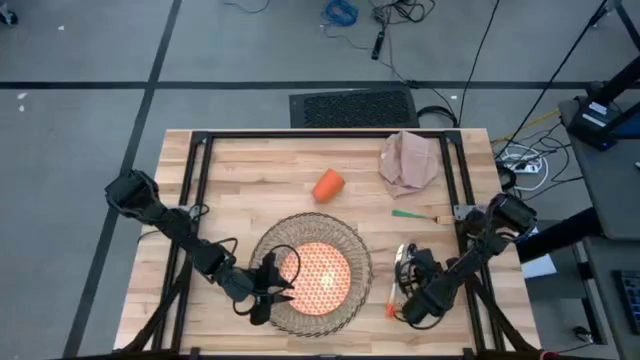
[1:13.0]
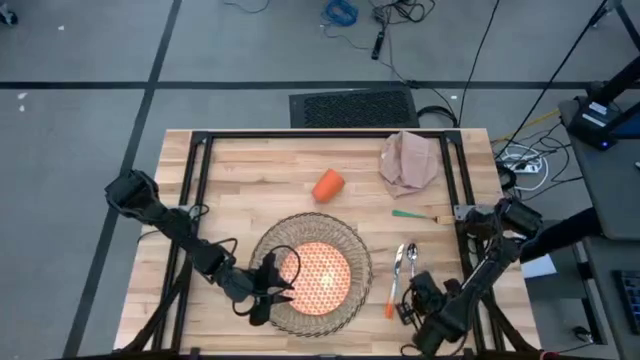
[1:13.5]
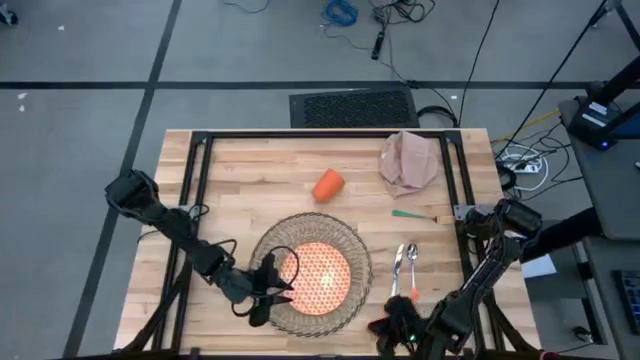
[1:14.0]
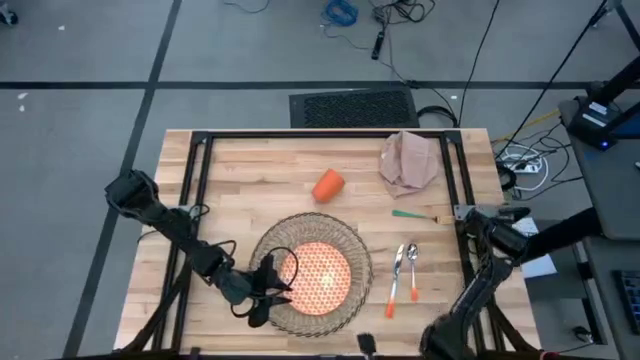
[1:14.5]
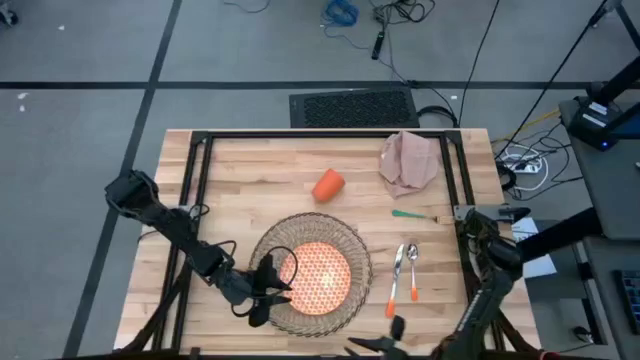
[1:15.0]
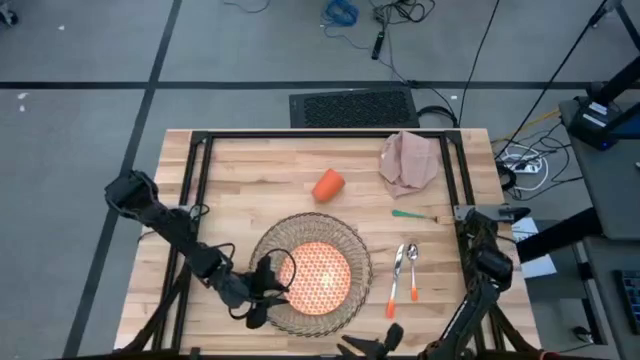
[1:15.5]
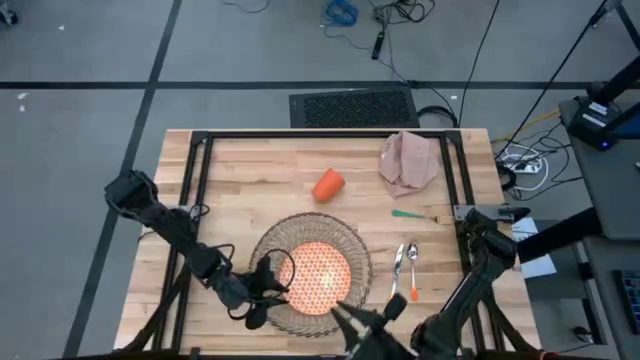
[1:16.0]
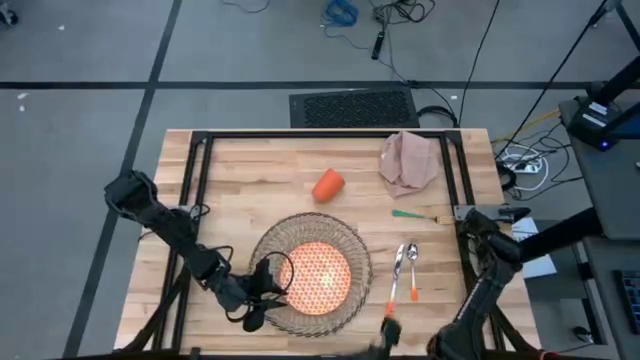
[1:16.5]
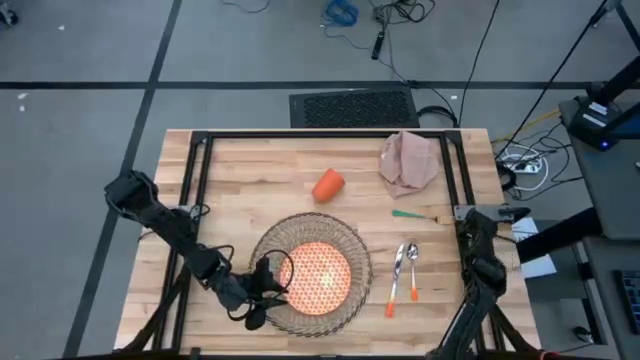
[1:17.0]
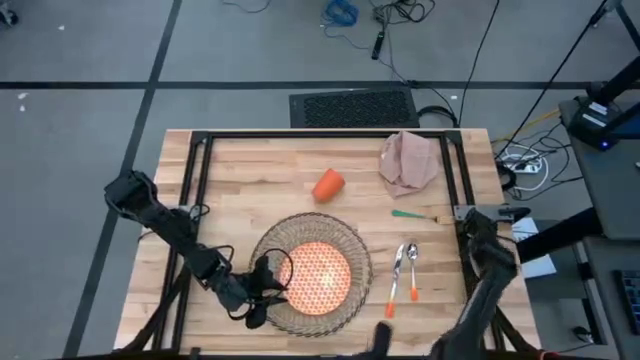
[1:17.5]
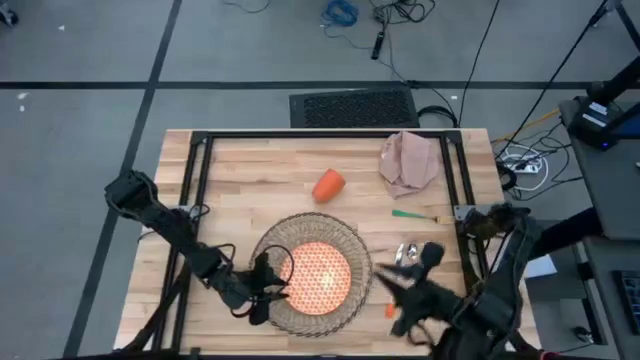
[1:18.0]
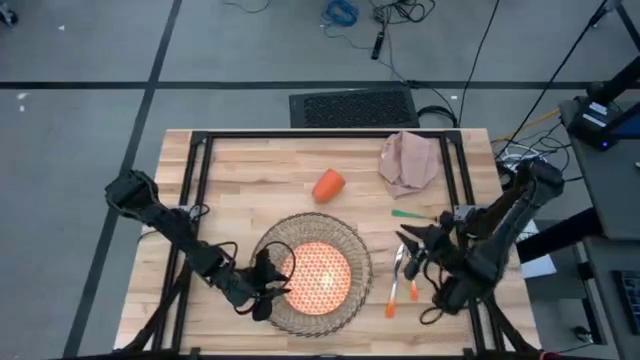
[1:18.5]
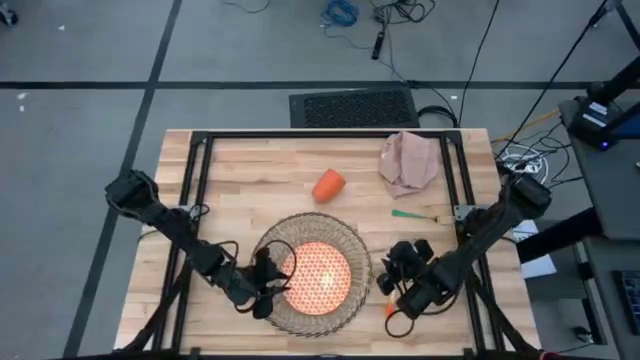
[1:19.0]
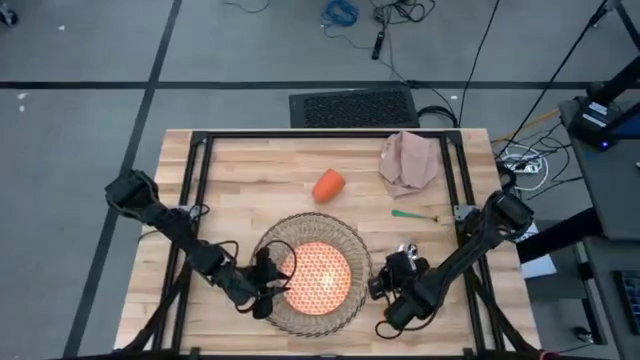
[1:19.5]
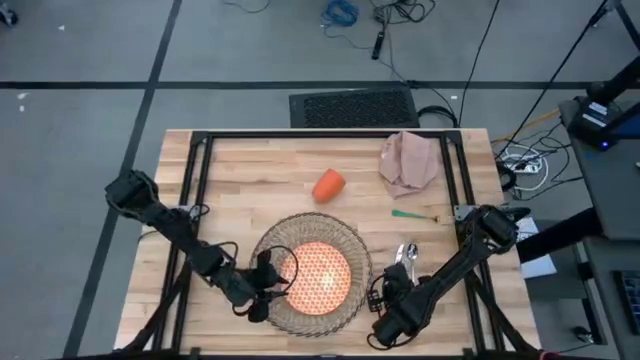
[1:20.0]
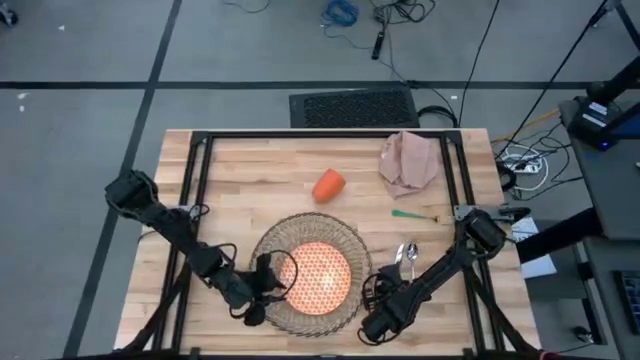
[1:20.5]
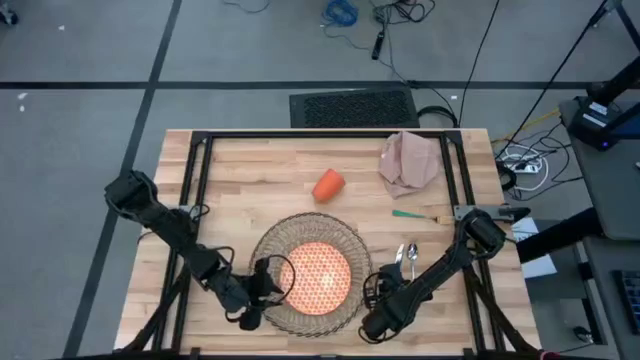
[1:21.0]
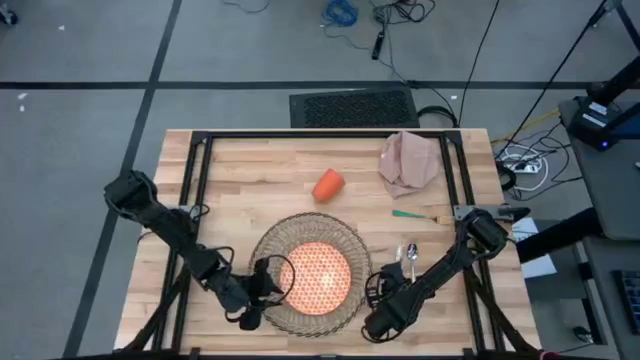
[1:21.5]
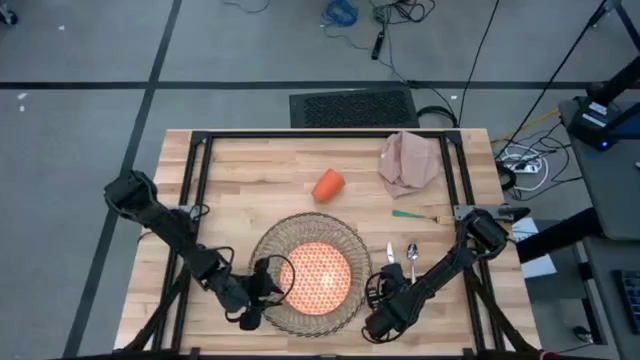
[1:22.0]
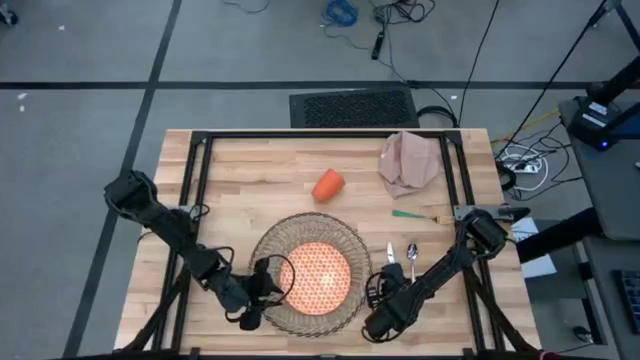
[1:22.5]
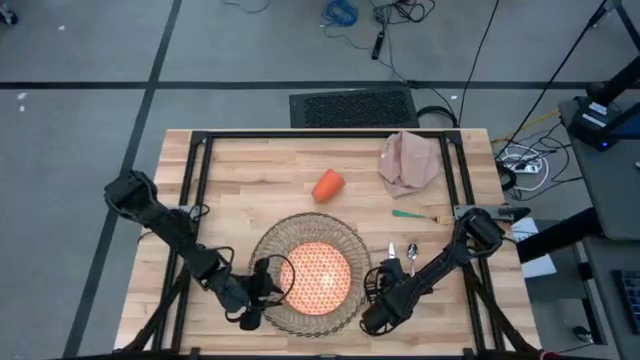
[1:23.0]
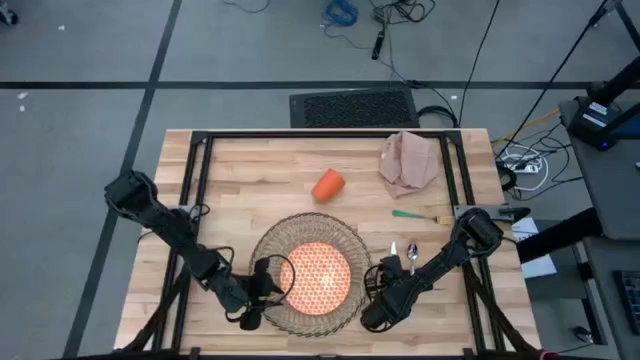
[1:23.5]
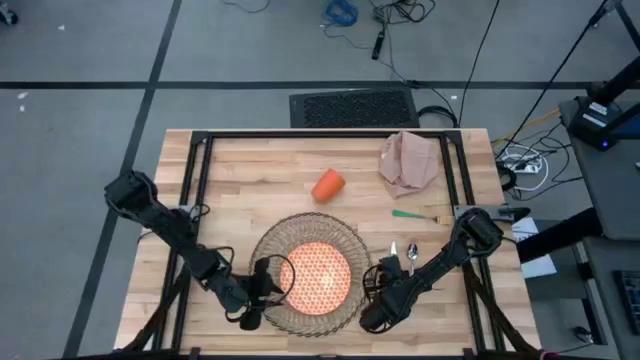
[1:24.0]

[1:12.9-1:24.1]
Task: Set table place
Adjust the orange knife

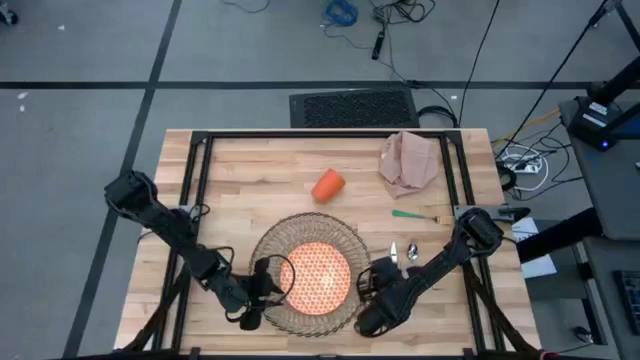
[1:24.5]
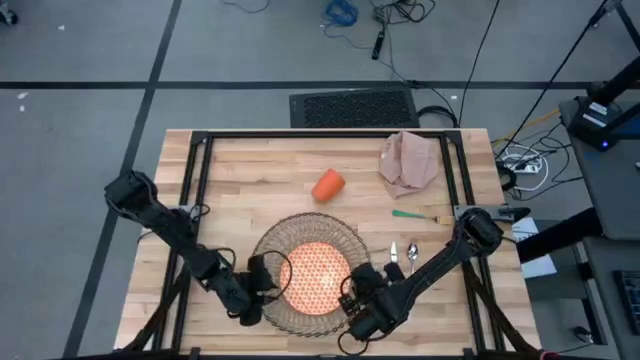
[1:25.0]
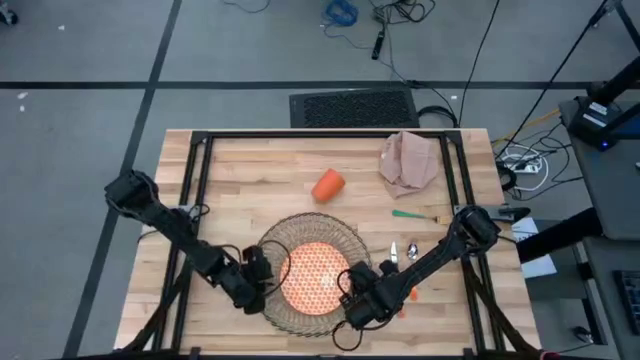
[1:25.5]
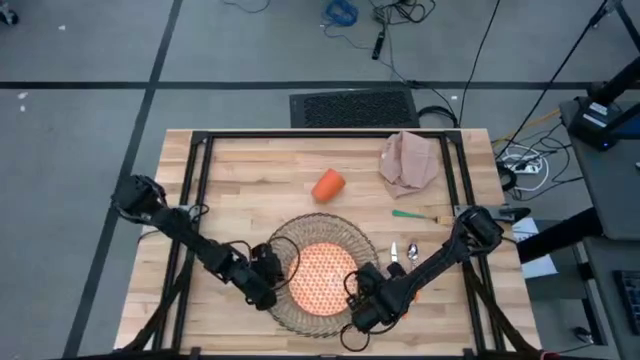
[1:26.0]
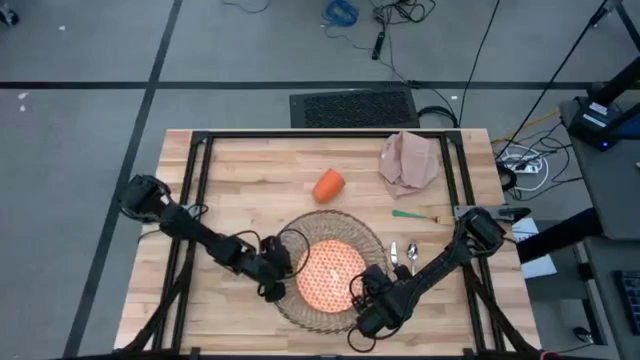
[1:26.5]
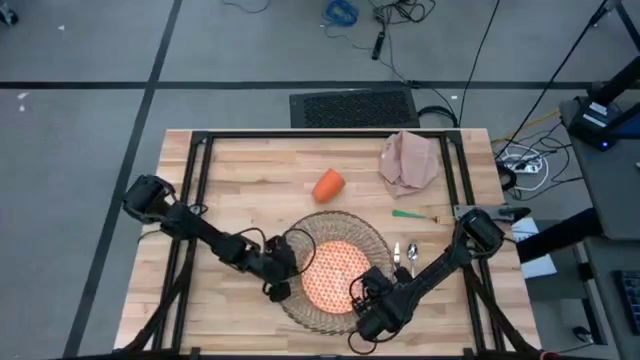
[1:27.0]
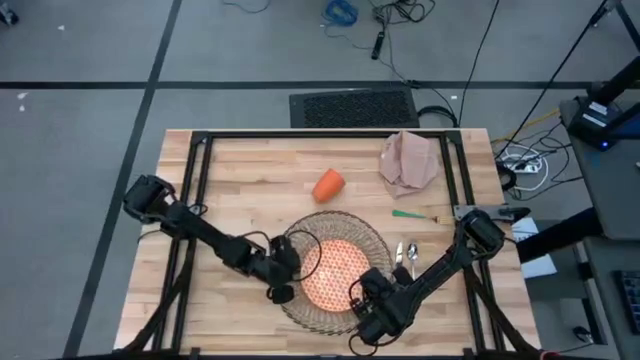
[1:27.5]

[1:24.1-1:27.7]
Adjust the brown mat

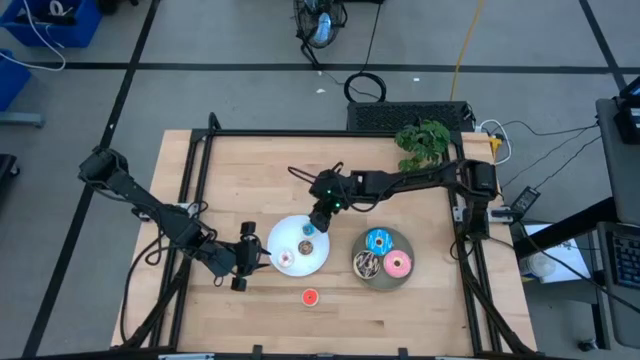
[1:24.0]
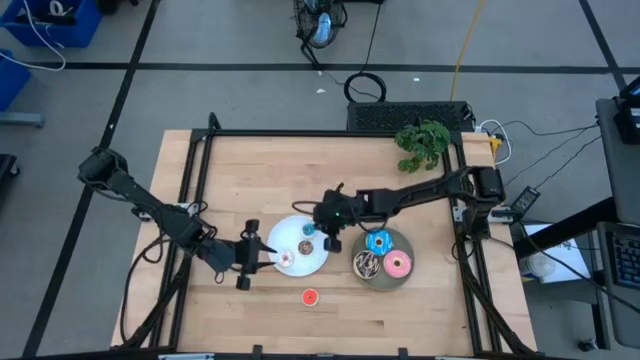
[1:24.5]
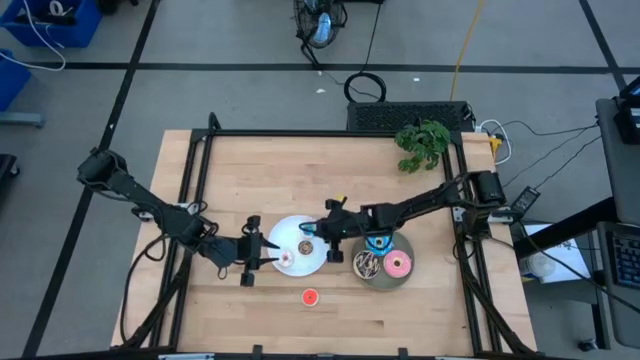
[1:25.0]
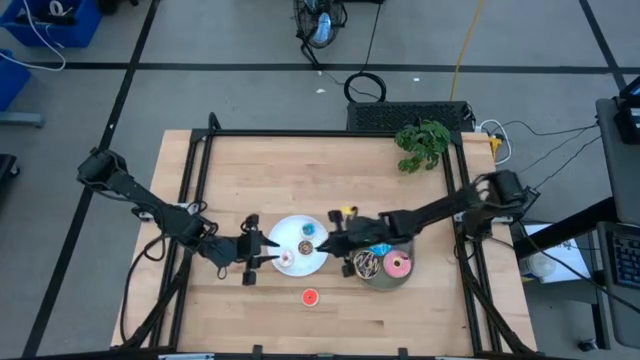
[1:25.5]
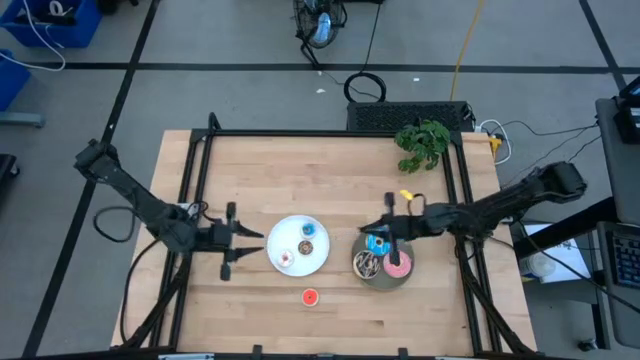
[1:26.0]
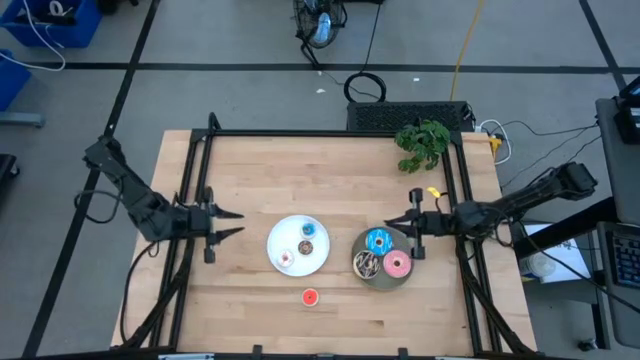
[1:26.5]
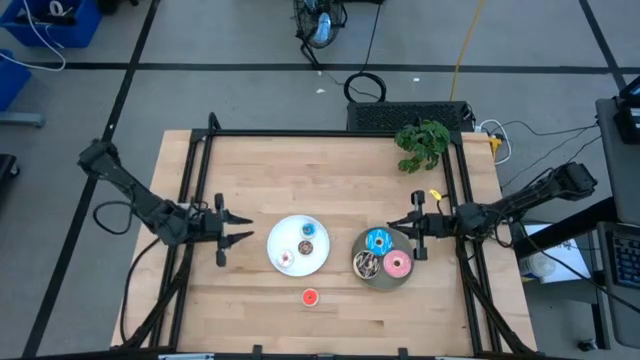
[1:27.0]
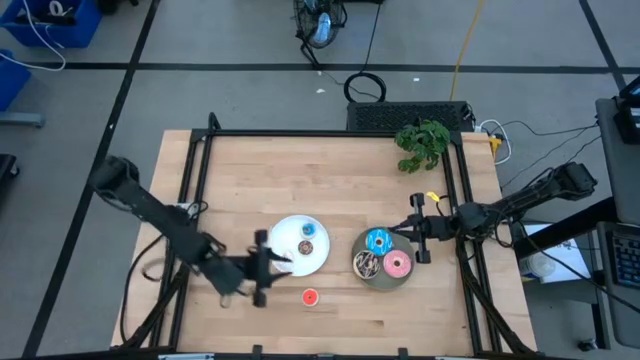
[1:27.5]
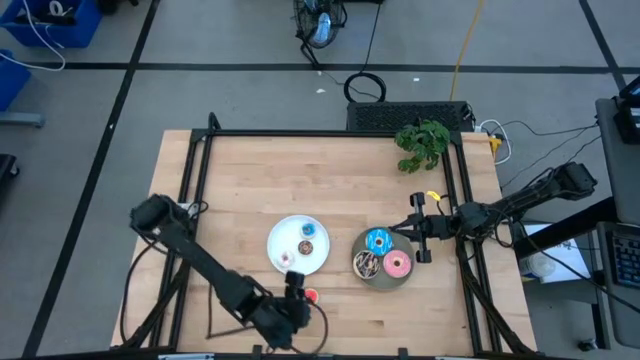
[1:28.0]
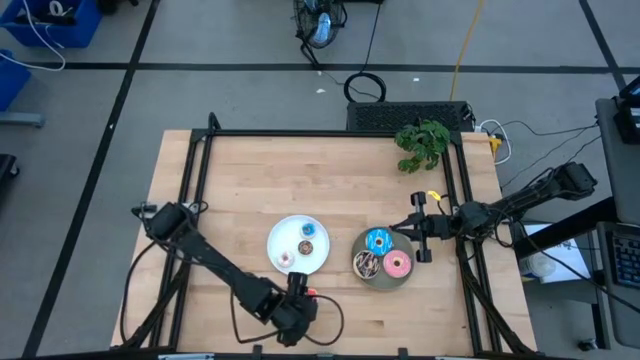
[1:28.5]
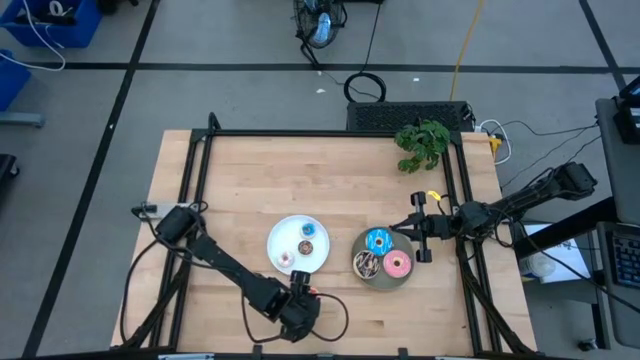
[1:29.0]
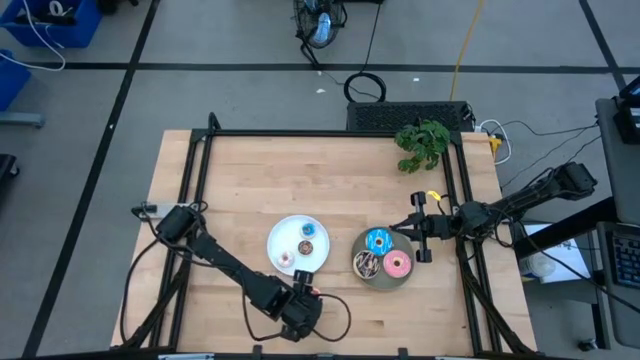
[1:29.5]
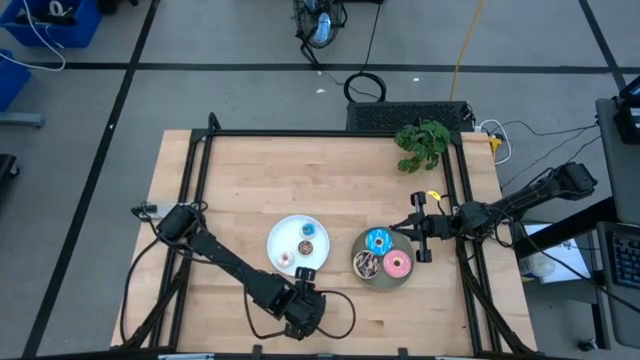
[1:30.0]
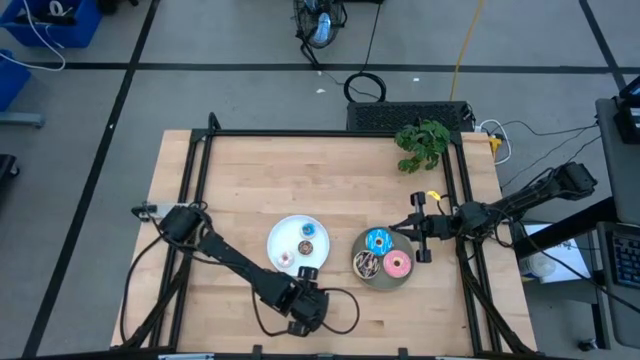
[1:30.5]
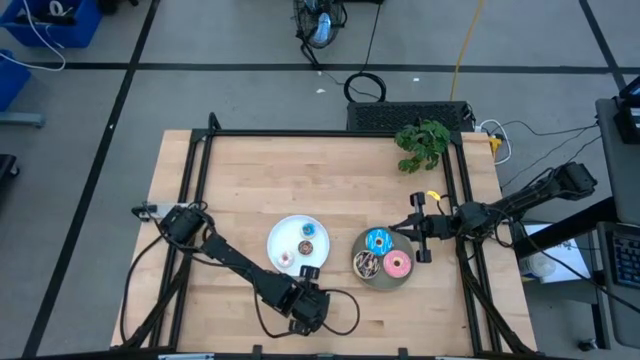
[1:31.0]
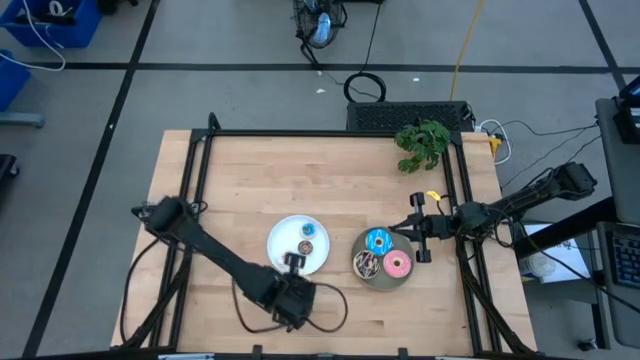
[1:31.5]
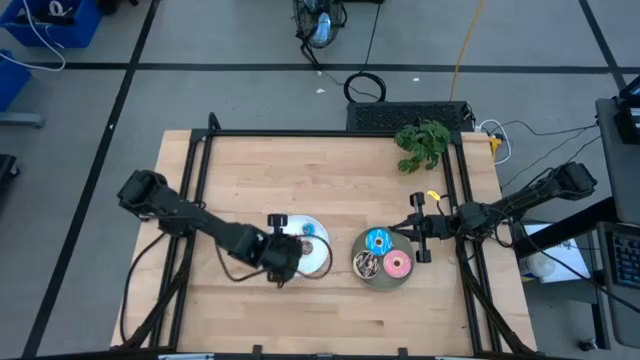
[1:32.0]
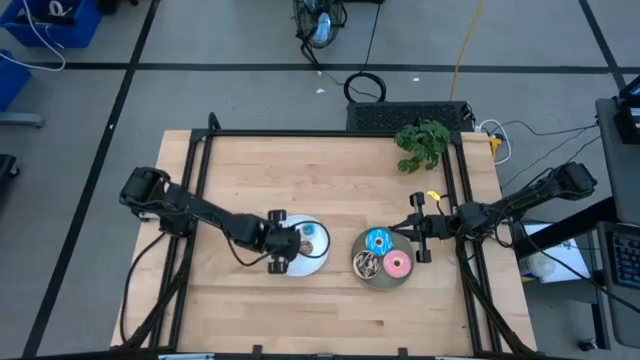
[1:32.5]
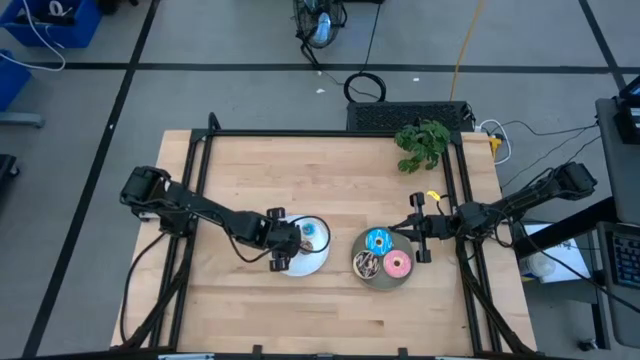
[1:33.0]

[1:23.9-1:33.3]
Task: Pick & Place donuts
Put the small orange donut on the white plate
